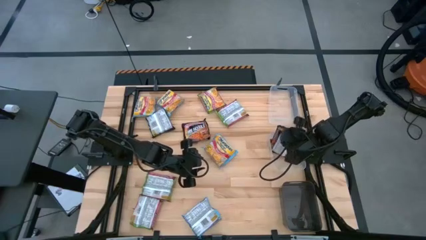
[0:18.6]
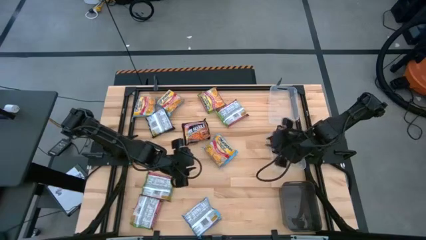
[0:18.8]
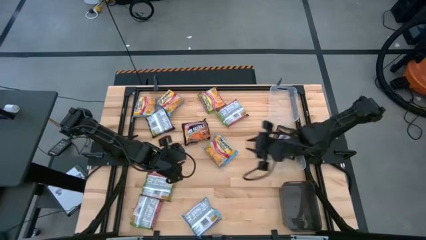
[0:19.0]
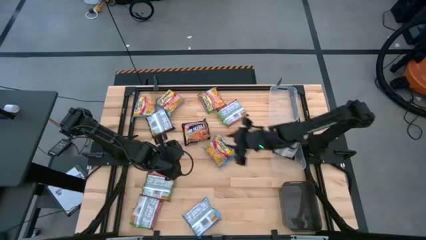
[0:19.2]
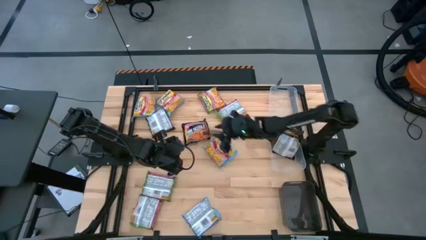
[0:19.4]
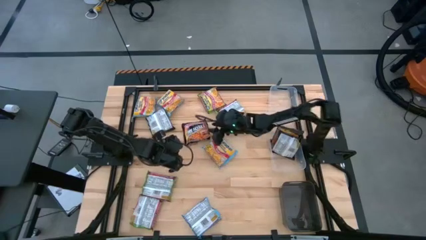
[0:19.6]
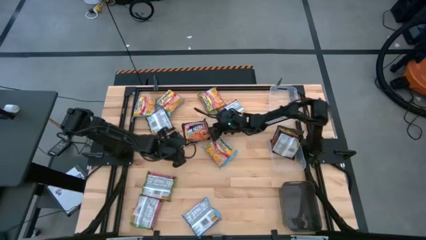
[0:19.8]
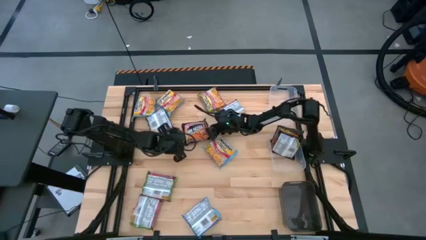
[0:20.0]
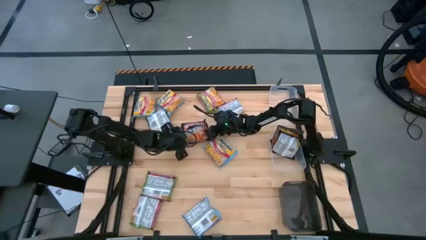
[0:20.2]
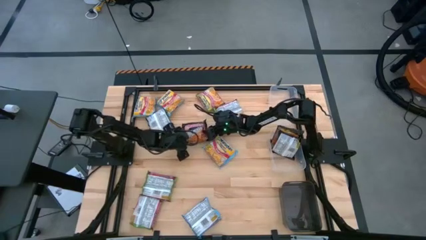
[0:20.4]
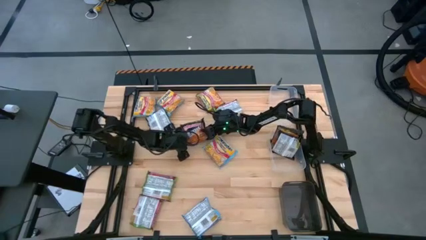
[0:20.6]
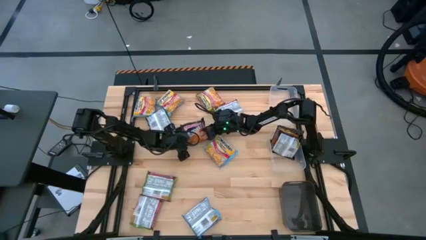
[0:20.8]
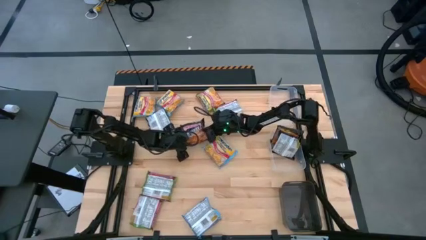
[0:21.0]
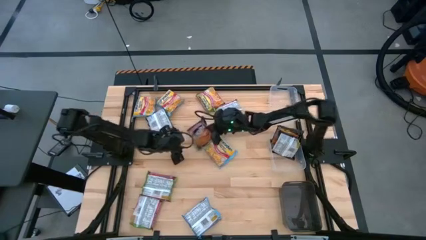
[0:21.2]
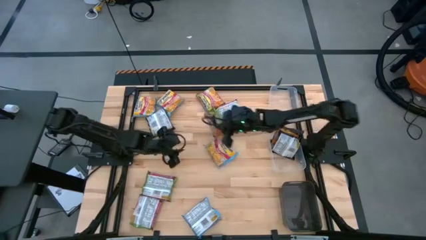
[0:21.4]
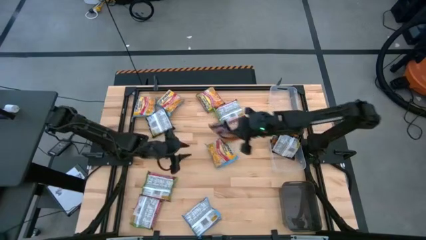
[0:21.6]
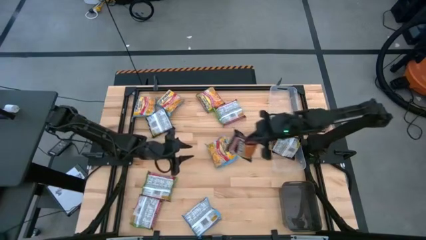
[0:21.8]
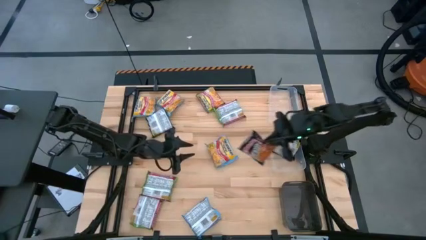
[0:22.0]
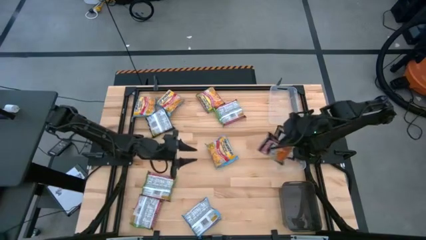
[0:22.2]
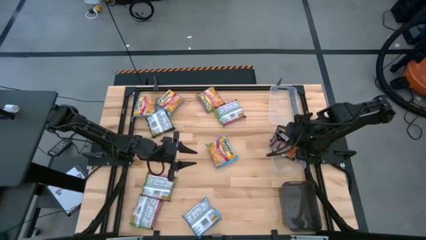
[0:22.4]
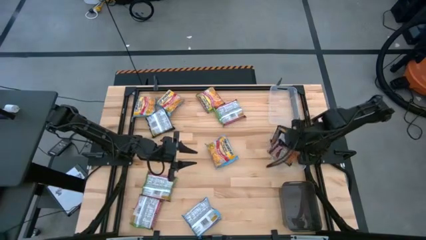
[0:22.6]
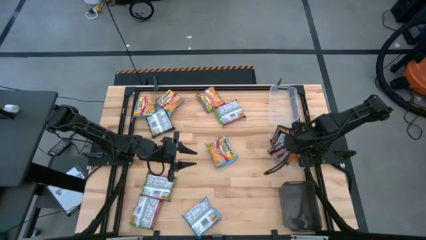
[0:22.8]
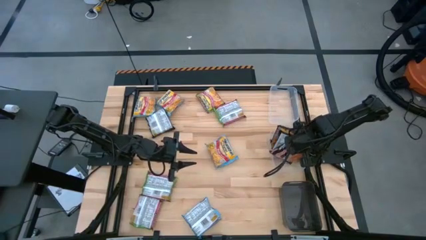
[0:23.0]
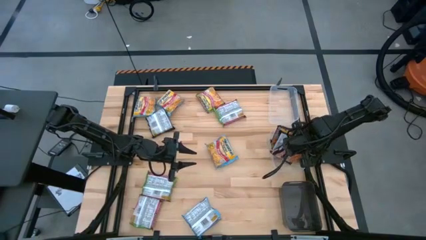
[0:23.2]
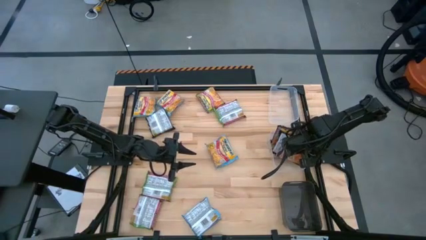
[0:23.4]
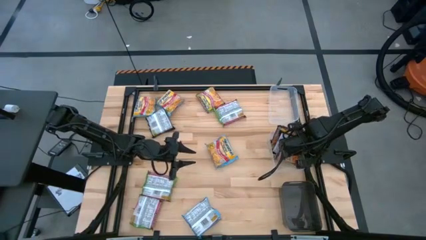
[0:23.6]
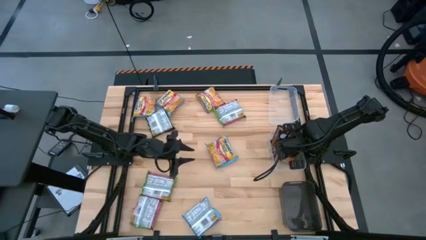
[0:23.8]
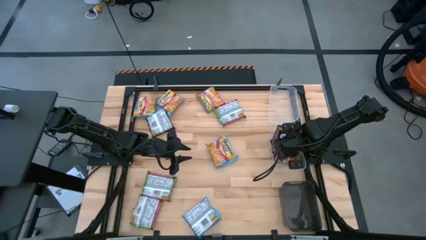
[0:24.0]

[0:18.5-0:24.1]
Task: Sort Maruchan noodles
Put the black noodle pack into the bottom transparent bin

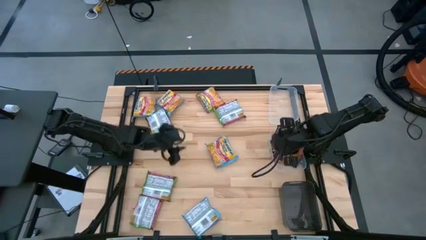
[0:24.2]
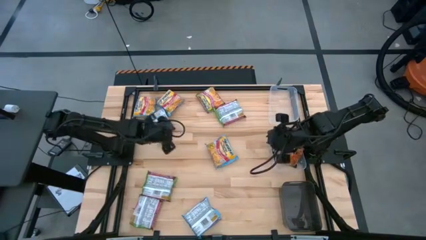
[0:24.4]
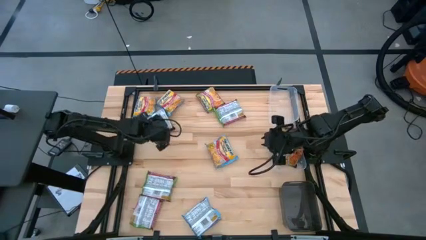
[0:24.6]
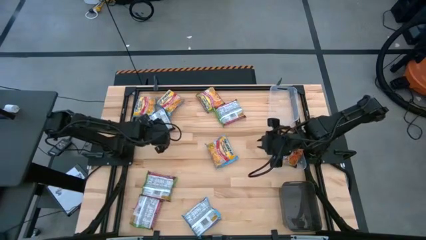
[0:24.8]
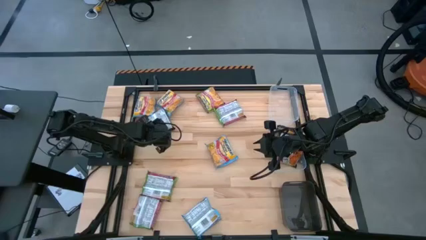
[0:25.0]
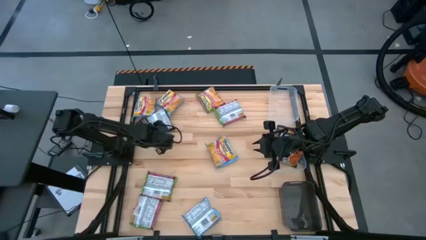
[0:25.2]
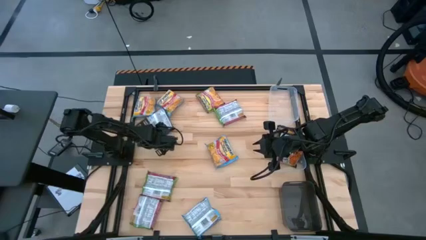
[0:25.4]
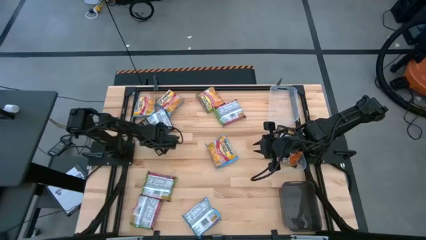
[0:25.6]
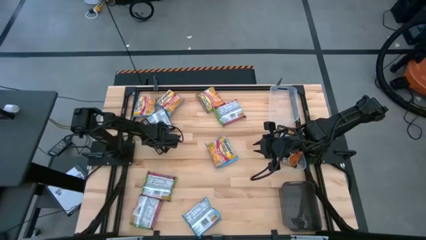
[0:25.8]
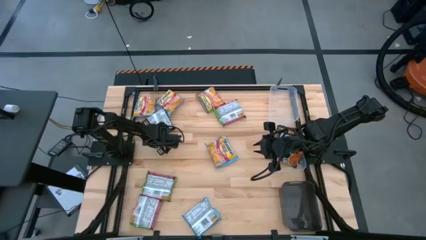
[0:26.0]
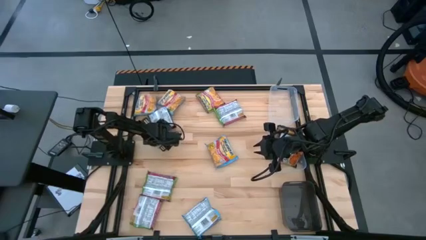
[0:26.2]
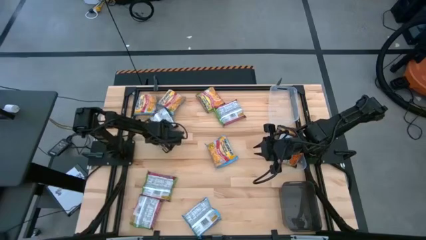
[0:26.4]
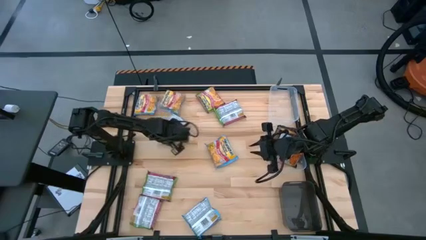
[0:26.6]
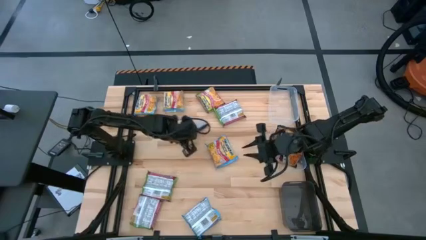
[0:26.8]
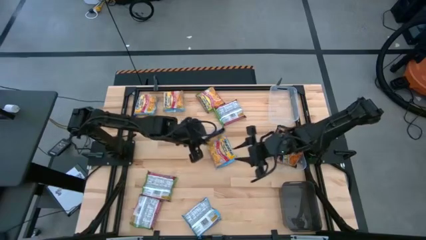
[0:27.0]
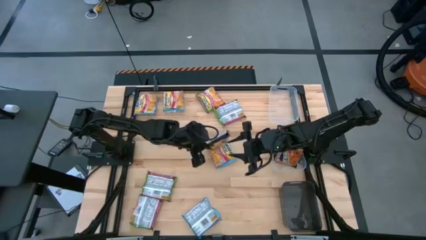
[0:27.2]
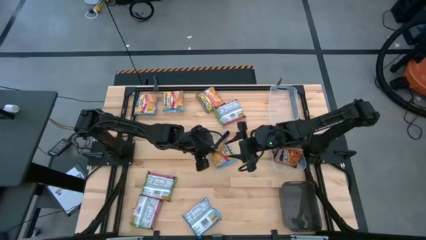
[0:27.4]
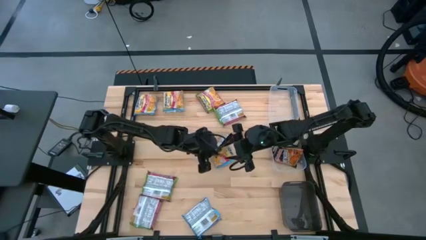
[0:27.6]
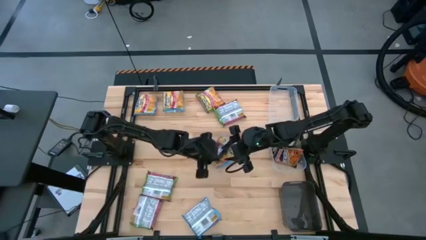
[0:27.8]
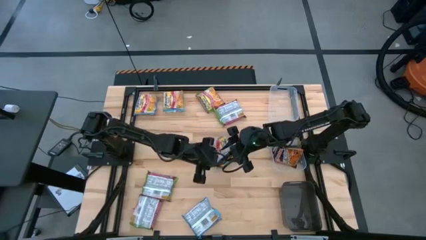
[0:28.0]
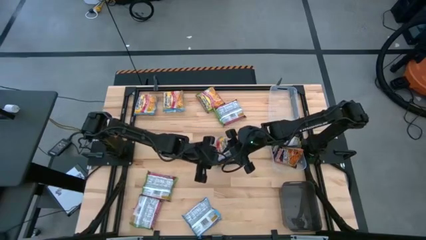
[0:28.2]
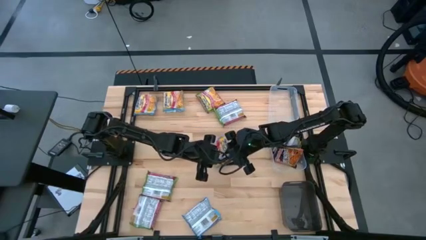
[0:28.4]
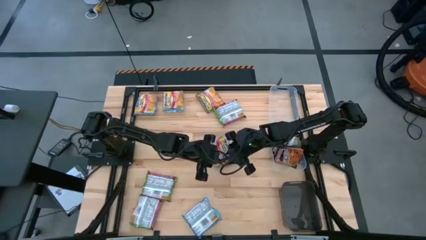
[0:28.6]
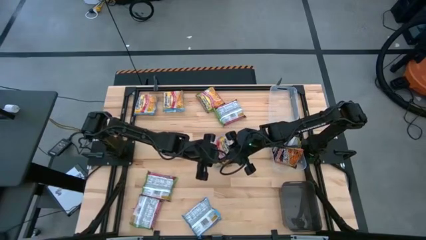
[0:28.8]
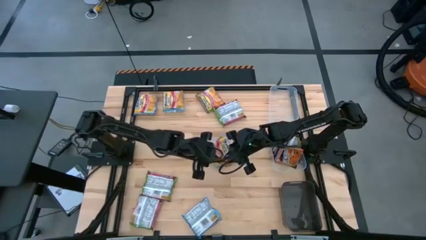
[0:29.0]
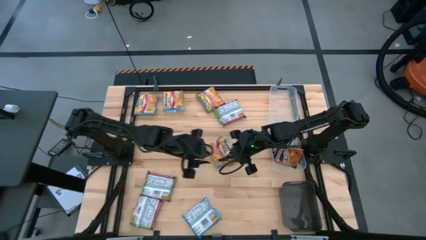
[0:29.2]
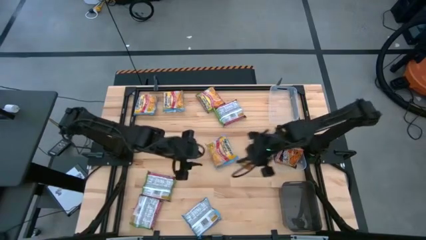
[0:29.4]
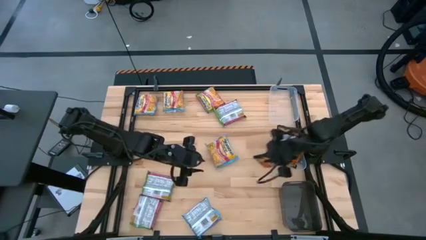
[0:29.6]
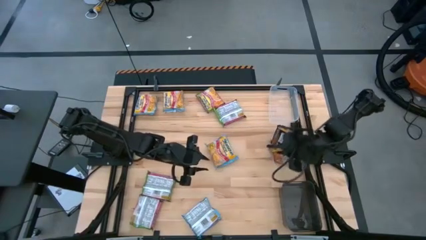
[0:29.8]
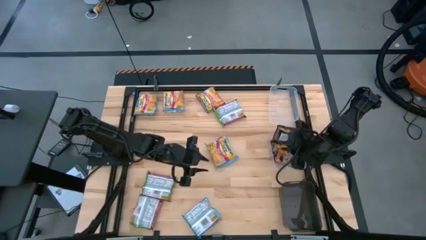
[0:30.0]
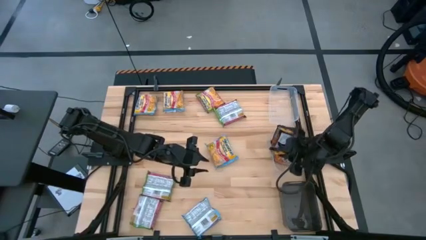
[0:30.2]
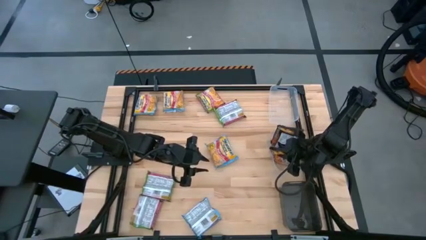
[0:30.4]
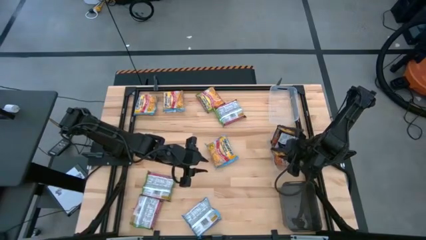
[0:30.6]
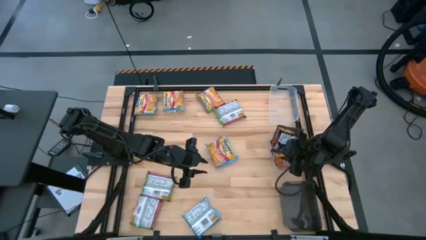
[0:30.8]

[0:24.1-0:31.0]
Put the black noodle pack into the bottom transparent bin

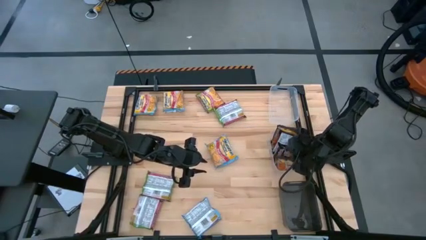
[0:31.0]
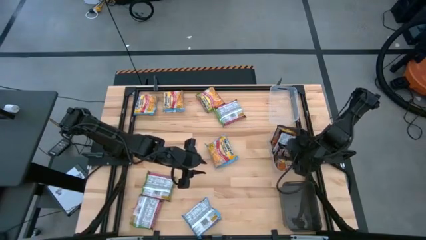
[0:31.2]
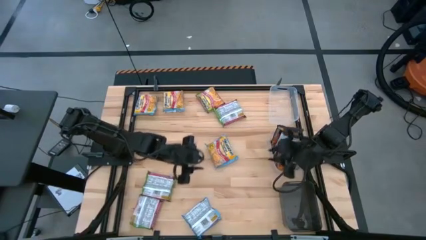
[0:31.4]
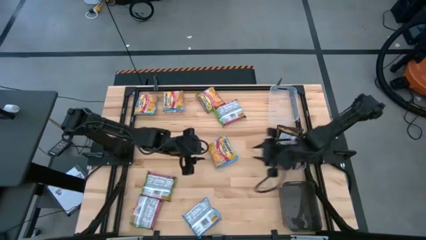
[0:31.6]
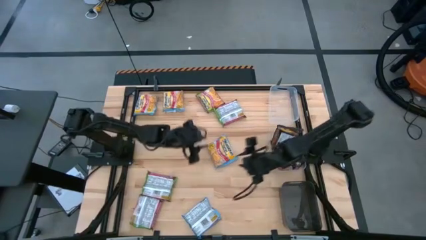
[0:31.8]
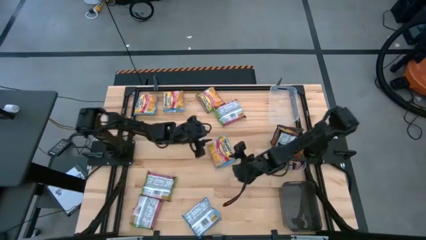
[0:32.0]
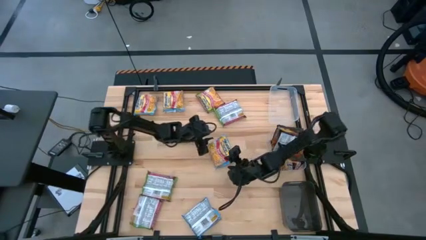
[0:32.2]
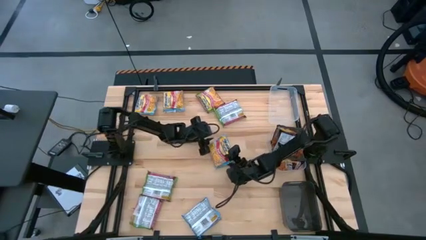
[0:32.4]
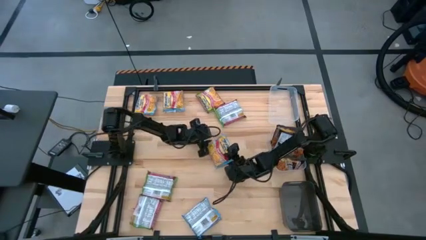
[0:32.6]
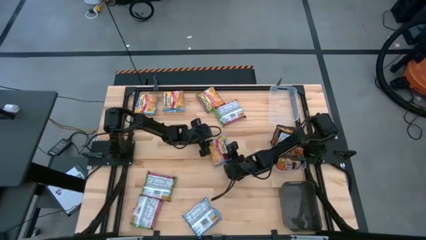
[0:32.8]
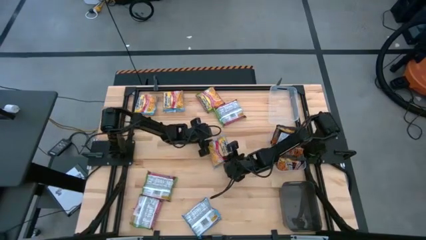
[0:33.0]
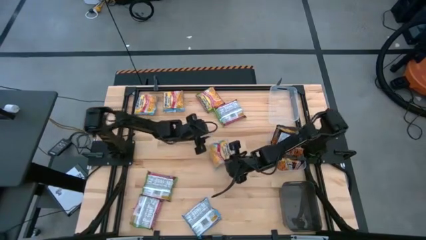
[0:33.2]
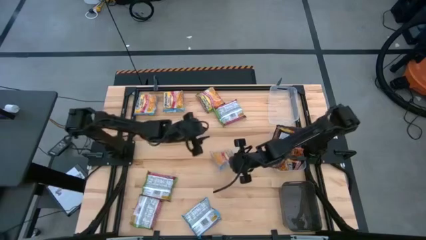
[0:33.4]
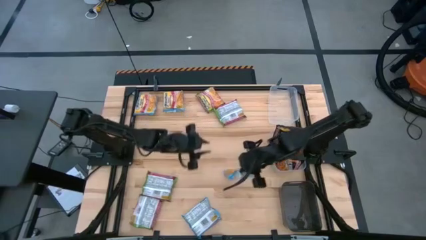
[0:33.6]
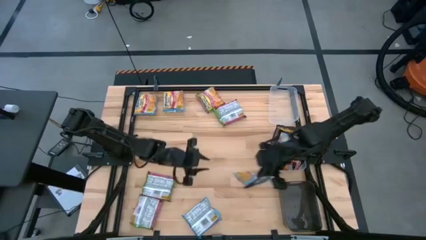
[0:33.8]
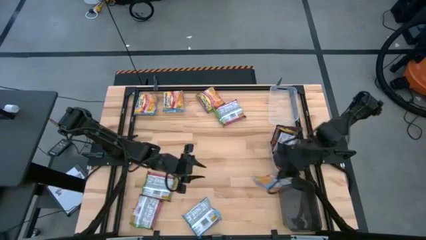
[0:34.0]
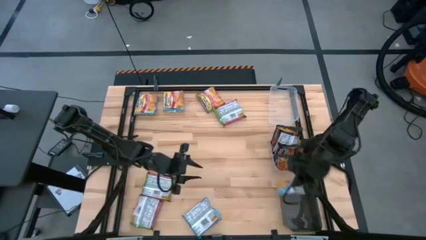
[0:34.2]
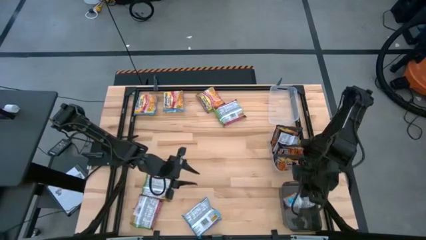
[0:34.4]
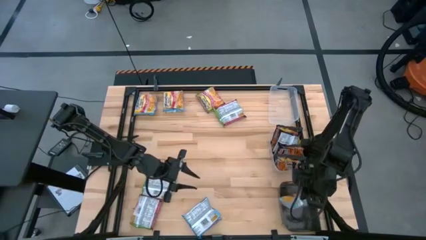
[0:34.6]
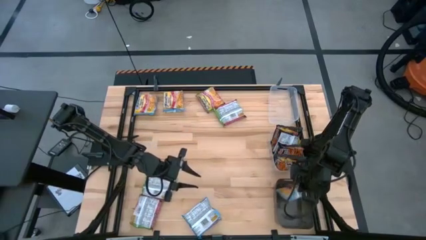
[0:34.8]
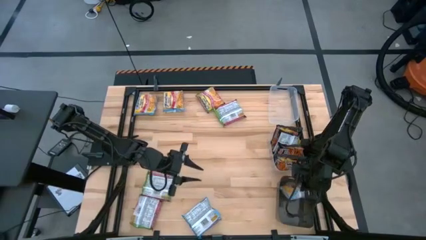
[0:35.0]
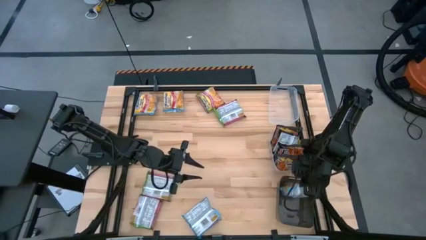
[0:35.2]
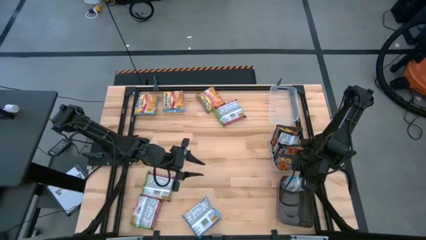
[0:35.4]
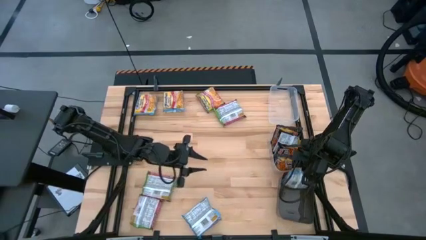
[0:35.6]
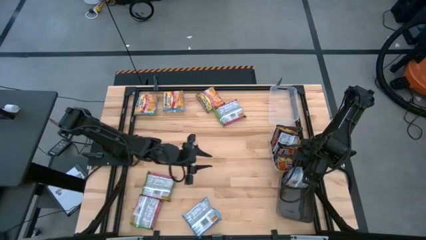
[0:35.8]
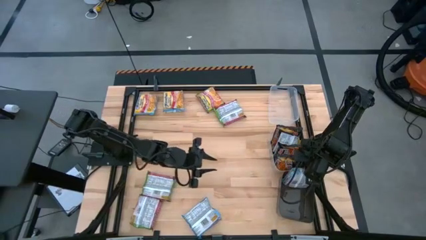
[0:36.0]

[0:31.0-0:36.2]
Put the blue noodle pack into the black bin
